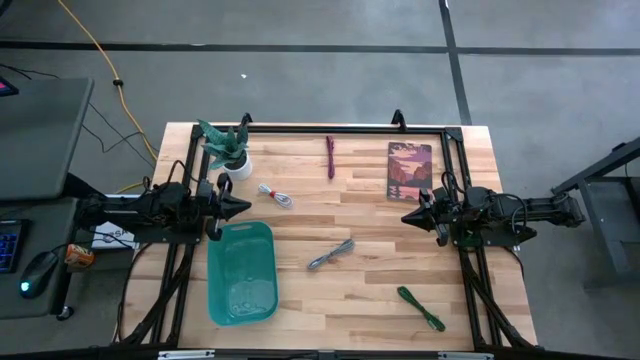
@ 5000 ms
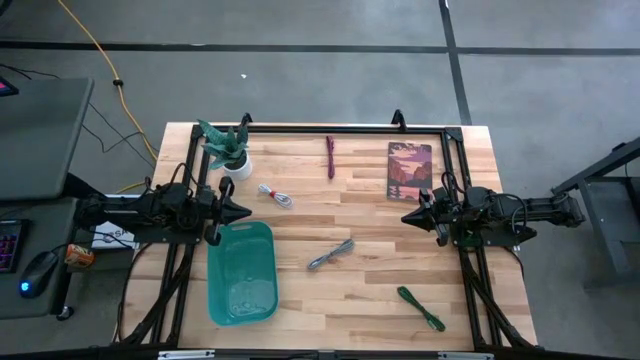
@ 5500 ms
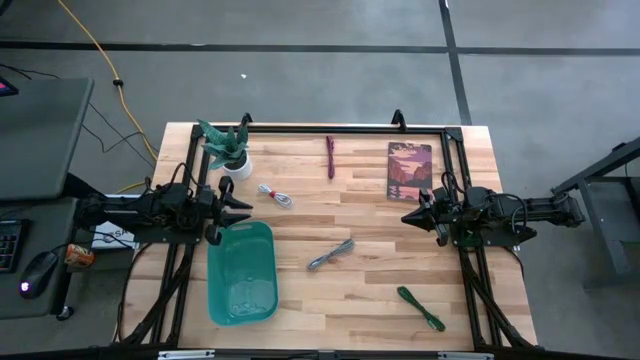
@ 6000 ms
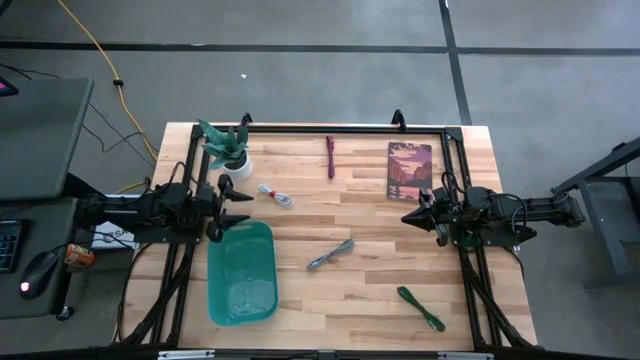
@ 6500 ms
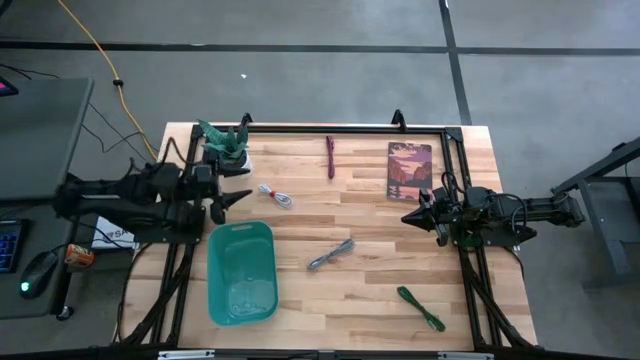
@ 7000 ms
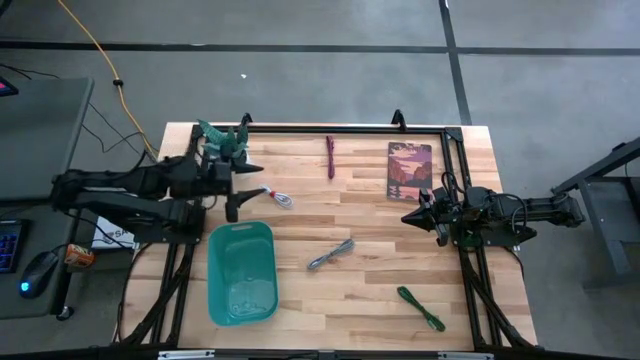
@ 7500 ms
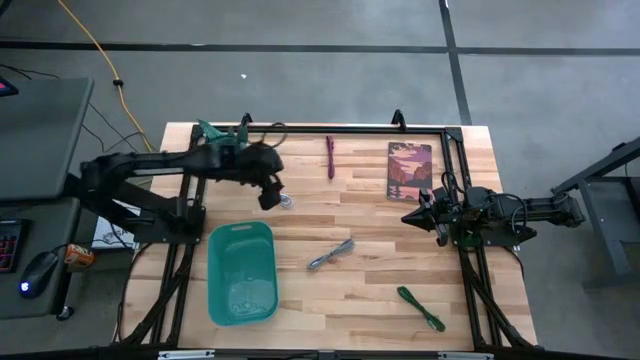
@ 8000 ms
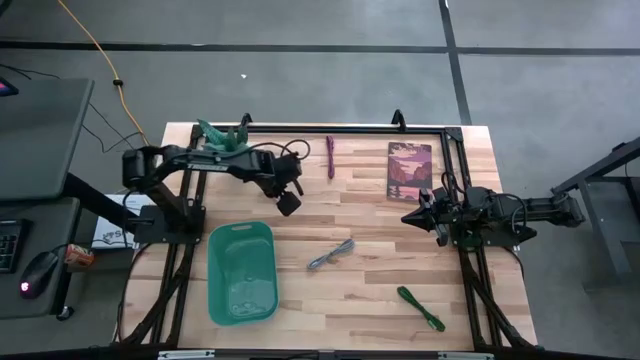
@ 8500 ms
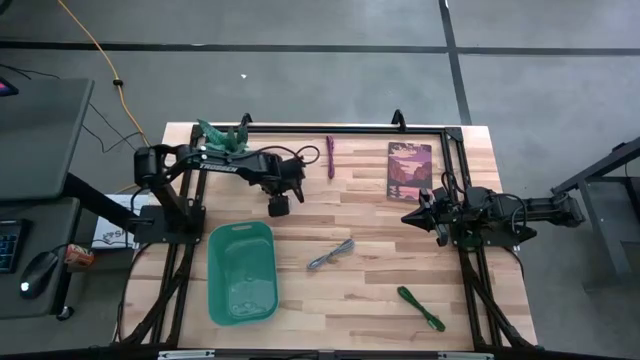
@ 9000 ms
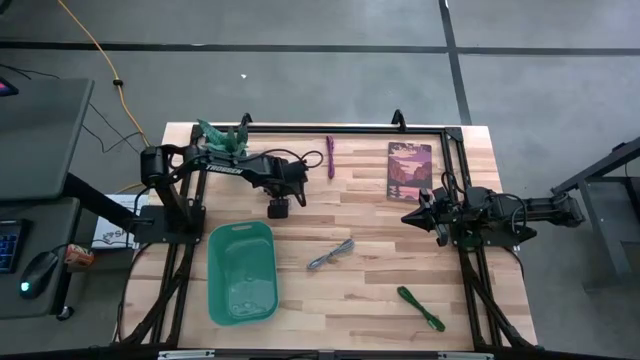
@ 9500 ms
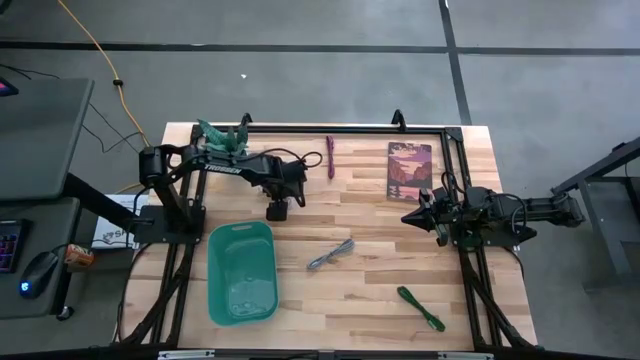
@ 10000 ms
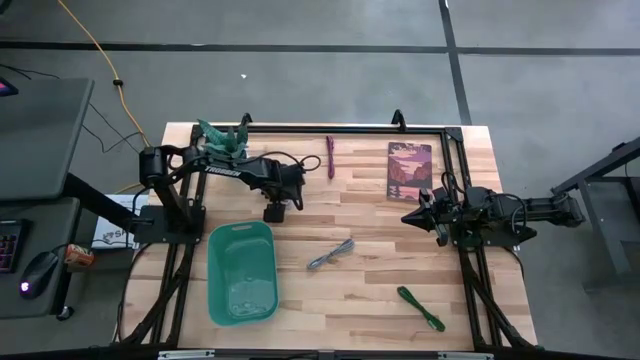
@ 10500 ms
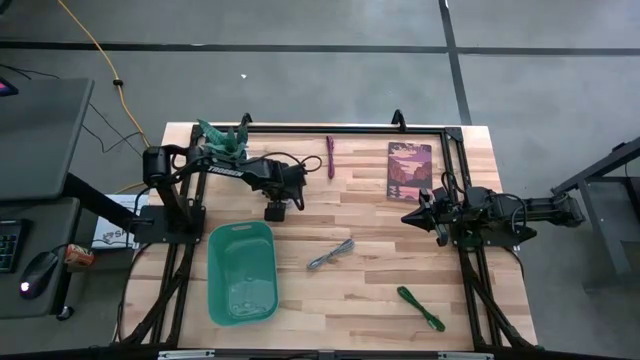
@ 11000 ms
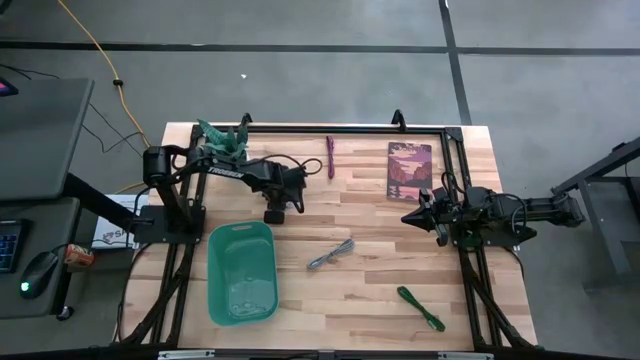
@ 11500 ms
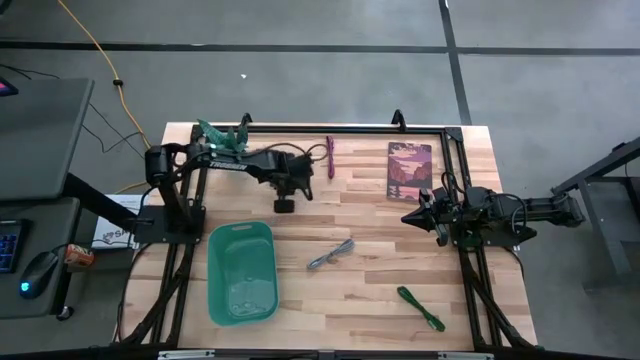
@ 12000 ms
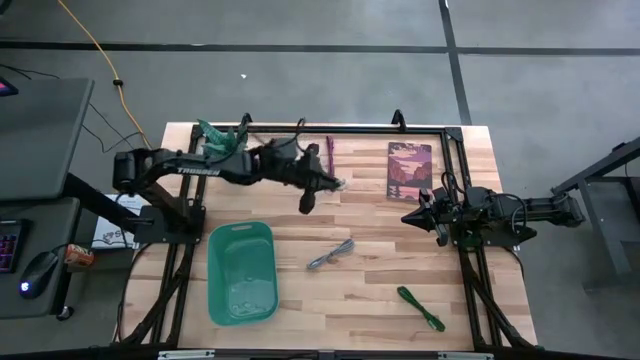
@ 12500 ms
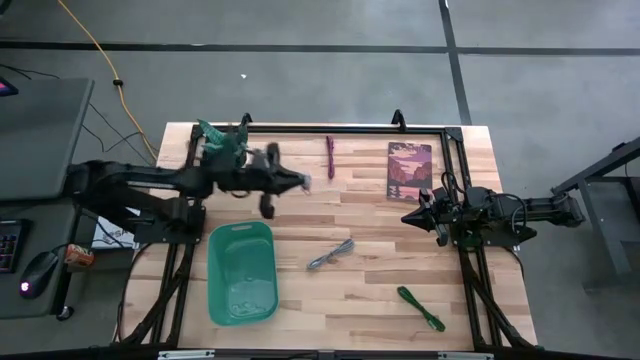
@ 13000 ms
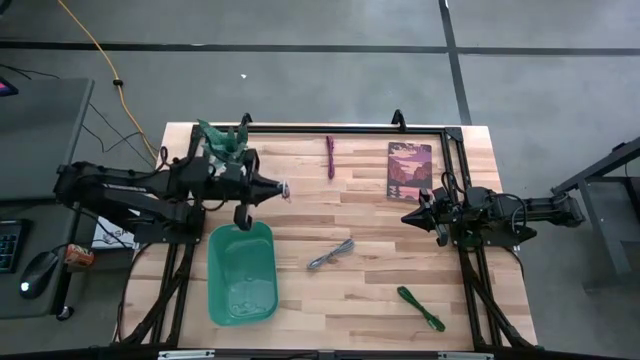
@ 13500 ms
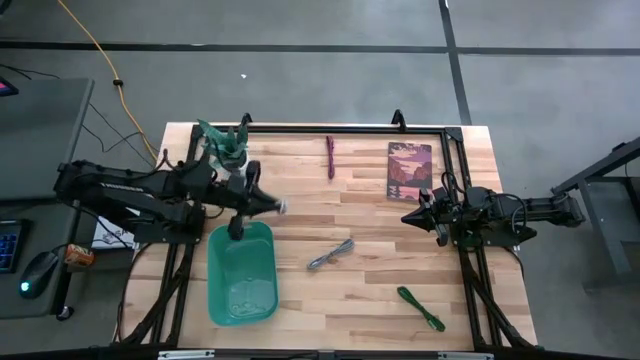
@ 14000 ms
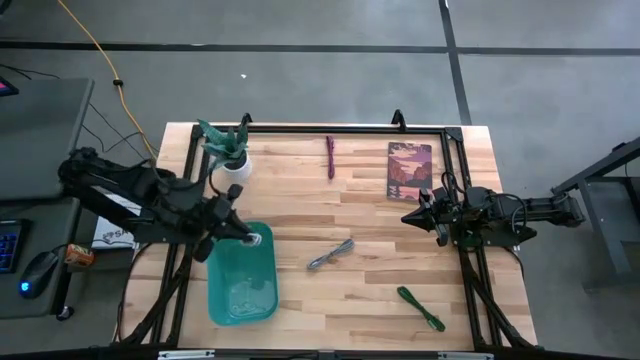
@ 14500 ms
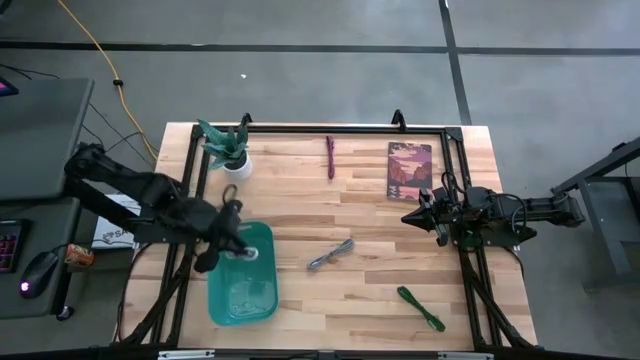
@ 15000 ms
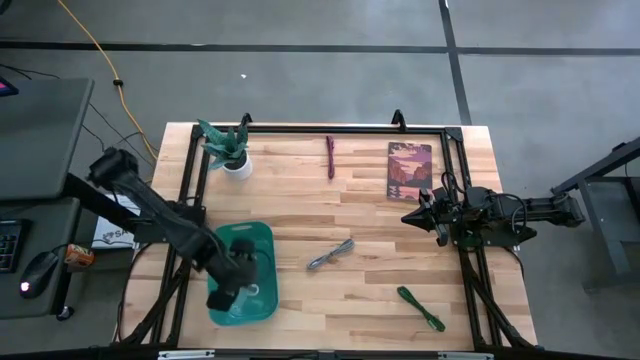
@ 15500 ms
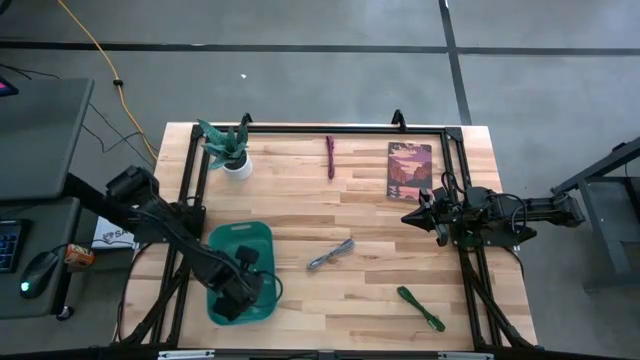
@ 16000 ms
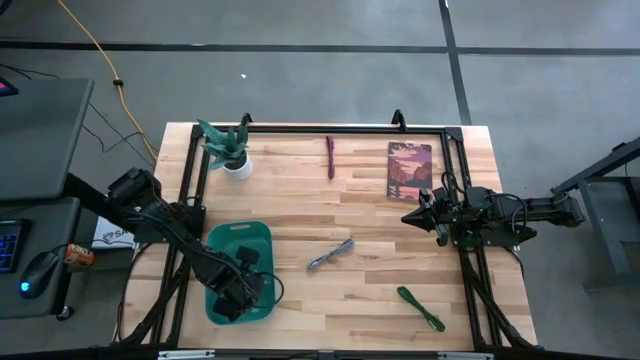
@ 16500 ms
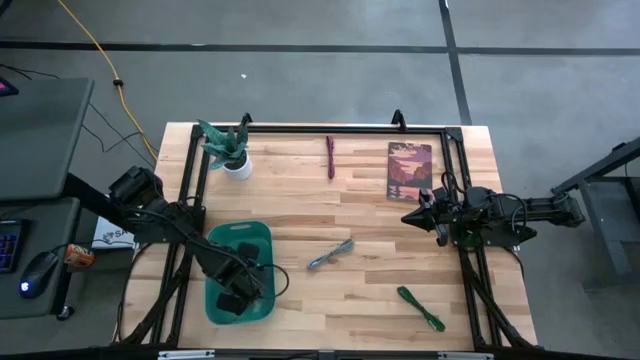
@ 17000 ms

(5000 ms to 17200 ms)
Task: Pick and place USB-C Cables
Put the white charger cable into the green bin
